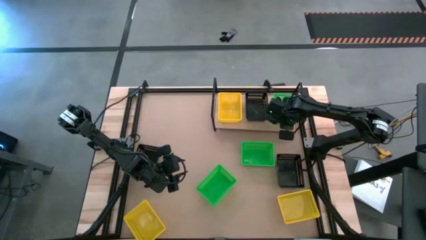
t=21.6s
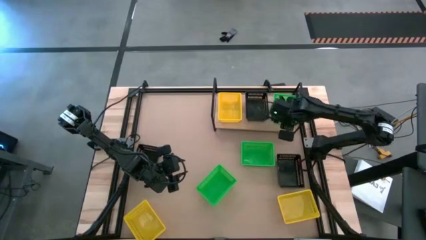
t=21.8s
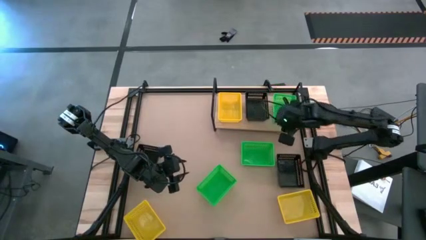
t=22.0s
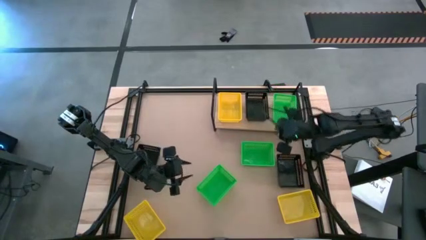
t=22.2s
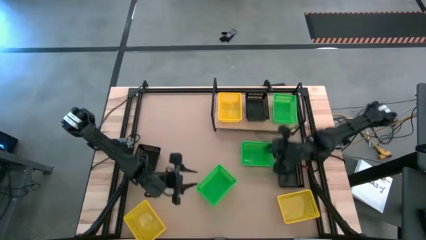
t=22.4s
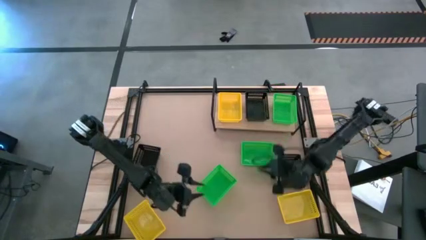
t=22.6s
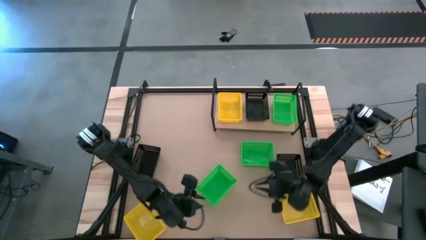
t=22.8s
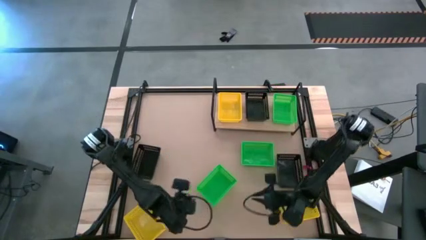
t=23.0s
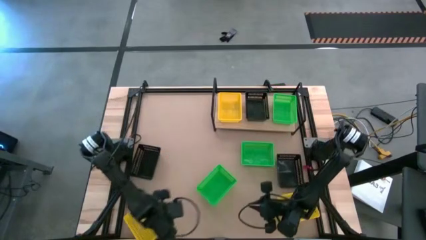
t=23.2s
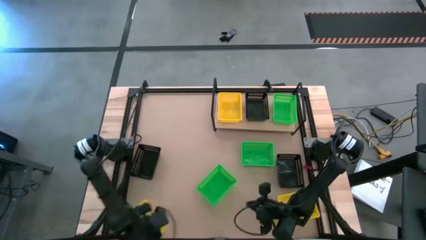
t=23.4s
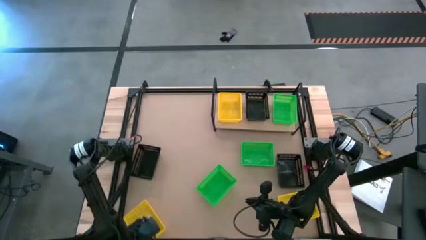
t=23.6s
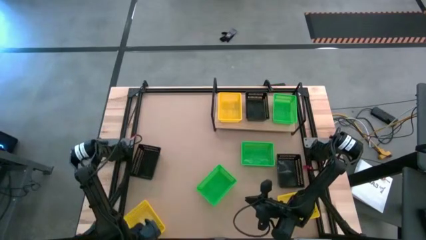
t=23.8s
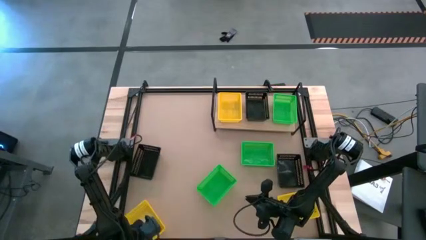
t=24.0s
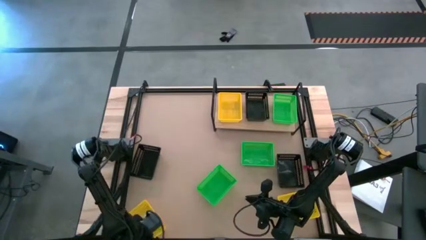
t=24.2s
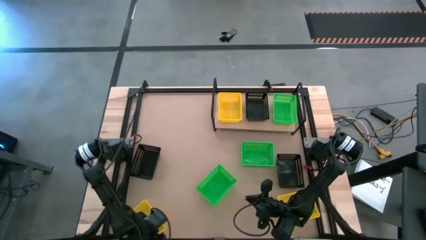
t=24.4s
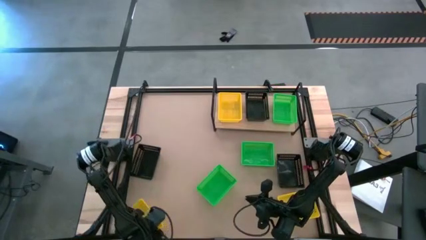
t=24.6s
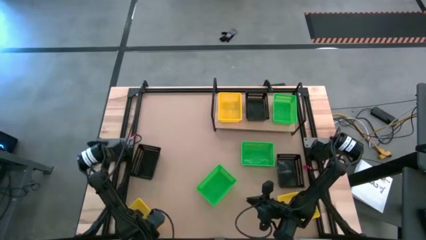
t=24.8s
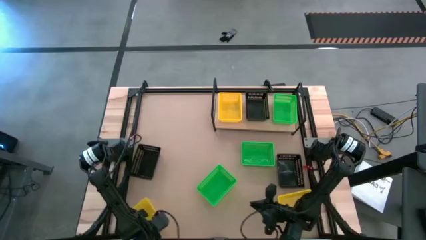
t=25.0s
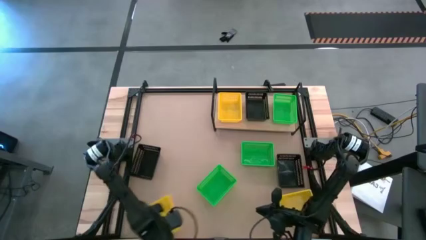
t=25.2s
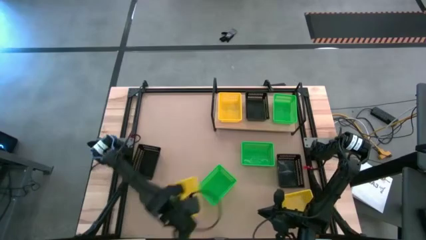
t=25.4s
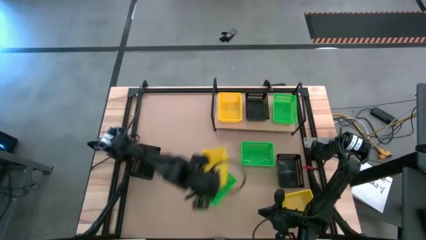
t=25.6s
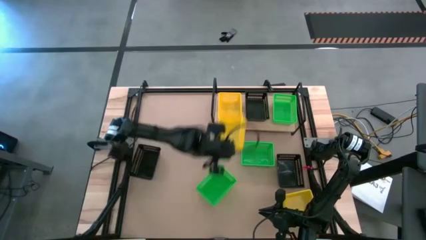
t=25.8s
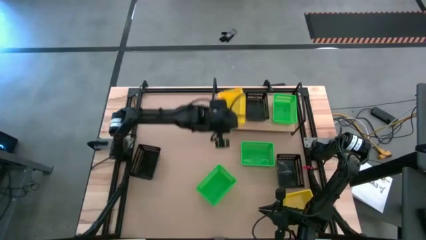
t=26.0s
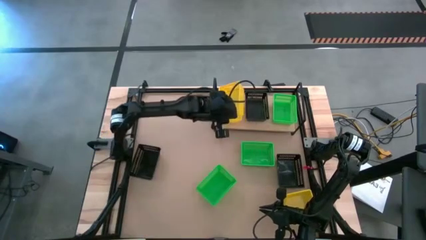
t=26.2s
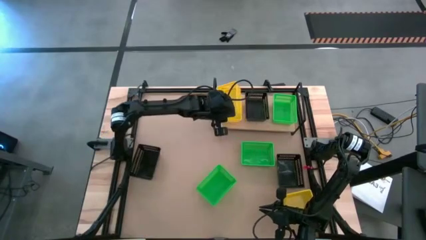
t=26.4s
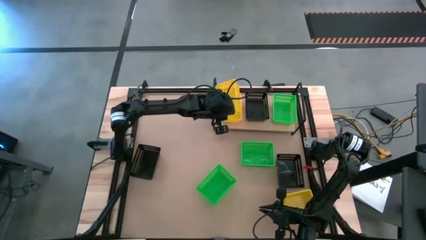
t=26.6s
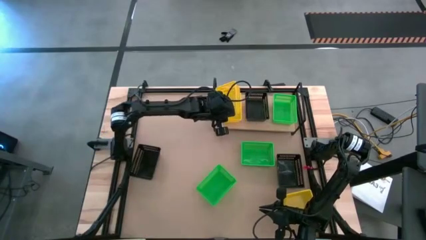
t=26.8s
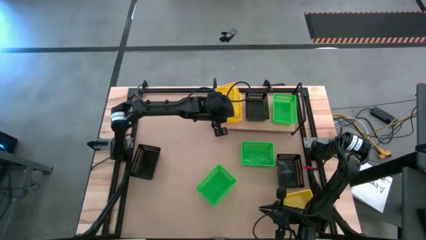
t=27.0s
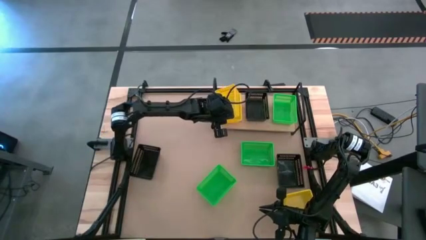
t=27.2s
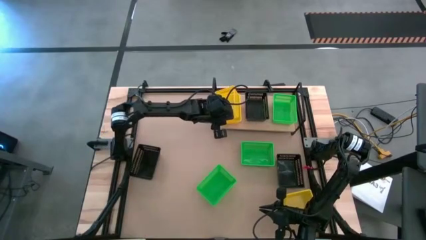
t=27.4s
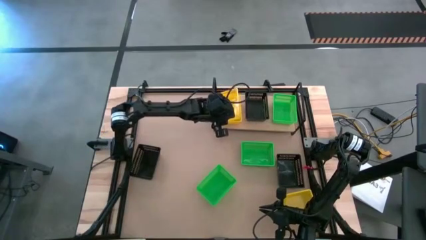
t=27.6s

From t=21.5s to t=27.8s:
Task: Stack baskets on shelf by color
Stack the left yellow bin on top of the yellow bin on the shelf

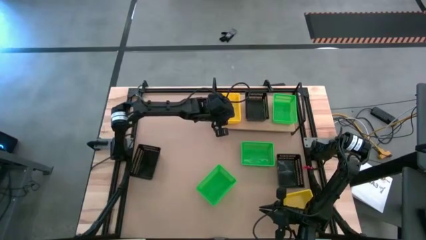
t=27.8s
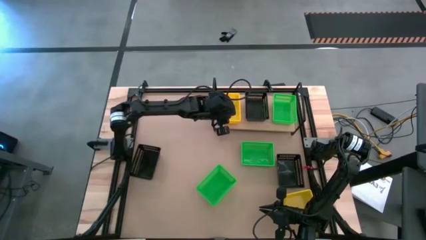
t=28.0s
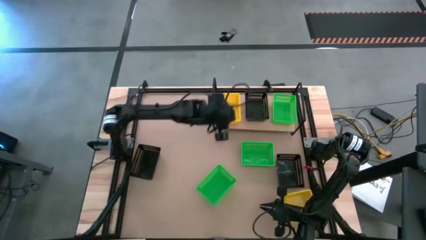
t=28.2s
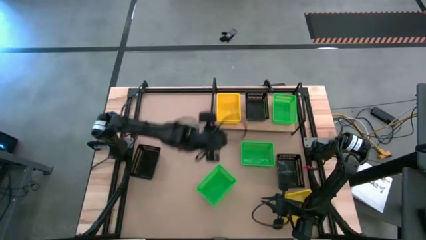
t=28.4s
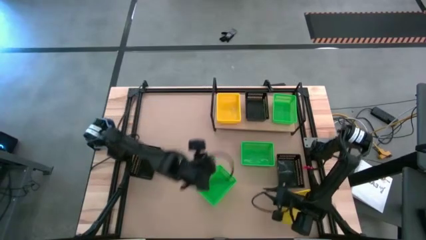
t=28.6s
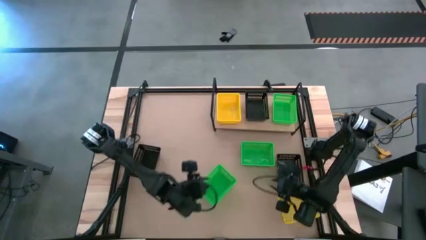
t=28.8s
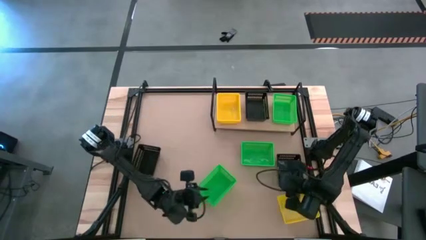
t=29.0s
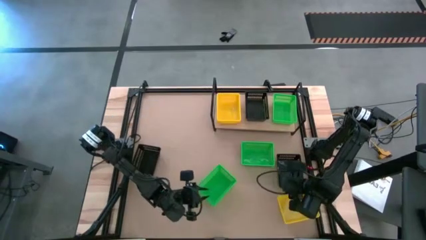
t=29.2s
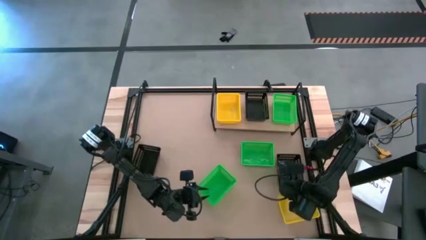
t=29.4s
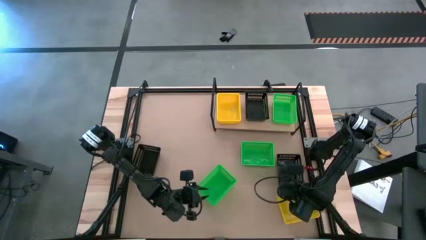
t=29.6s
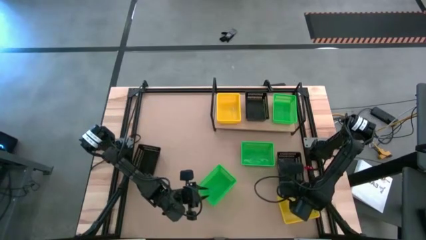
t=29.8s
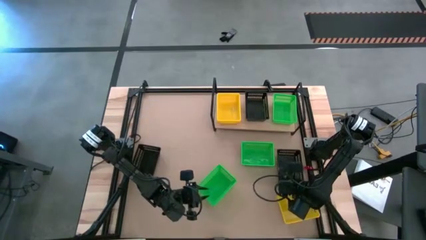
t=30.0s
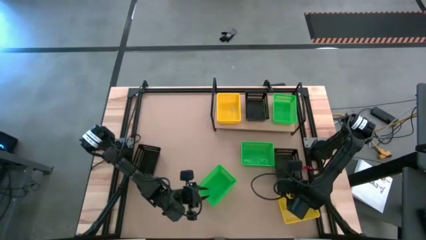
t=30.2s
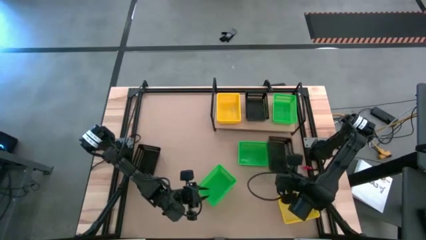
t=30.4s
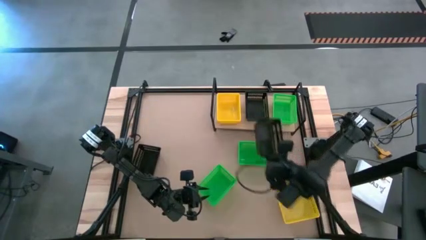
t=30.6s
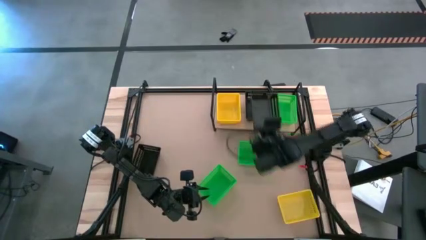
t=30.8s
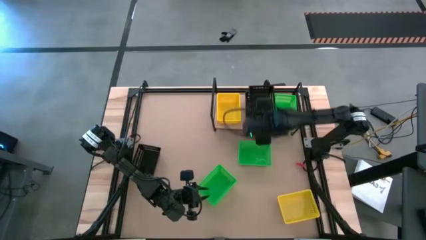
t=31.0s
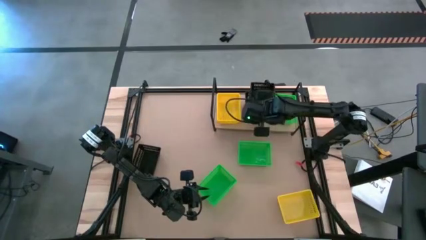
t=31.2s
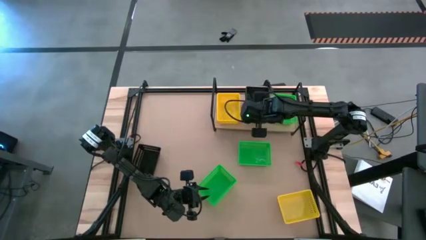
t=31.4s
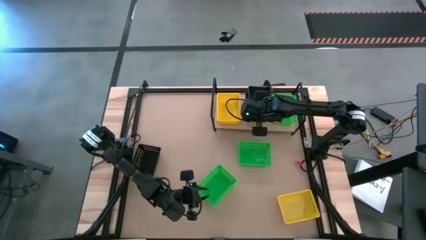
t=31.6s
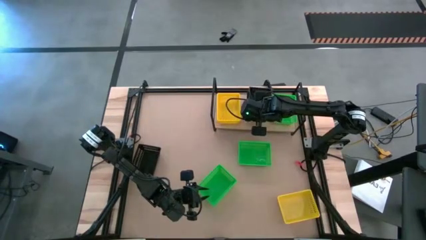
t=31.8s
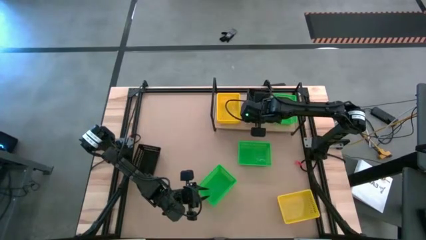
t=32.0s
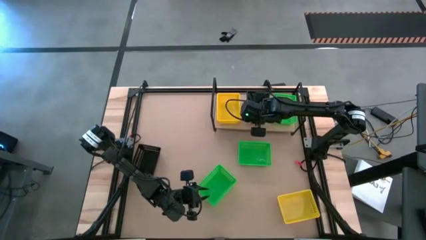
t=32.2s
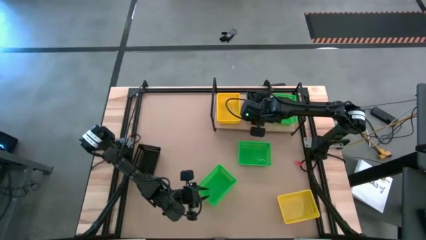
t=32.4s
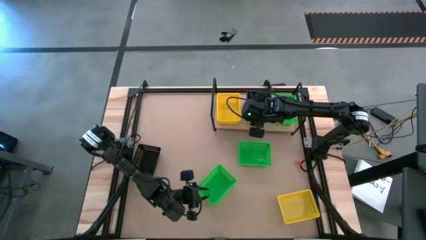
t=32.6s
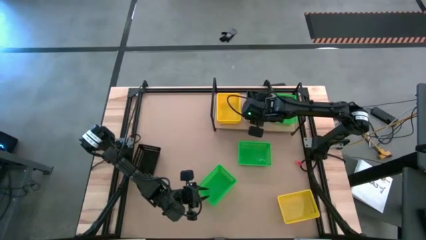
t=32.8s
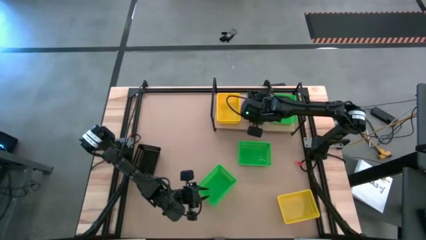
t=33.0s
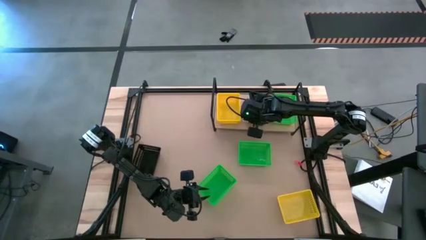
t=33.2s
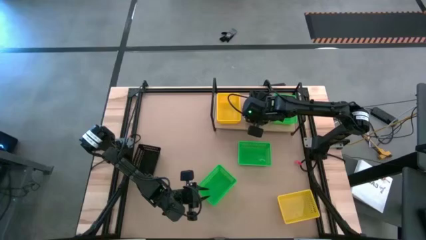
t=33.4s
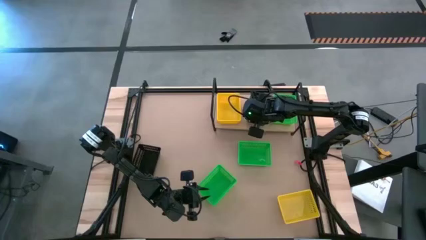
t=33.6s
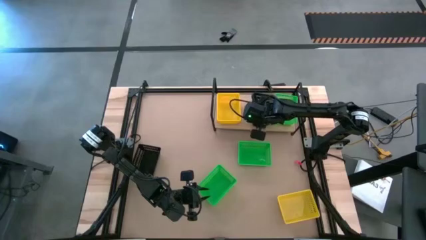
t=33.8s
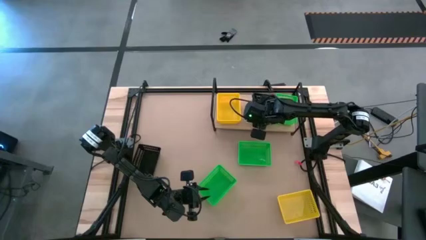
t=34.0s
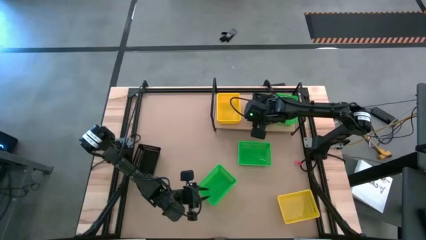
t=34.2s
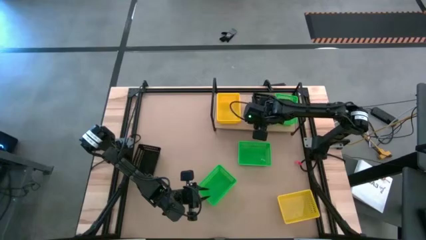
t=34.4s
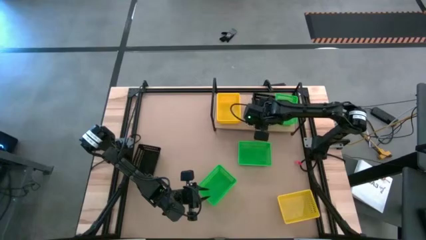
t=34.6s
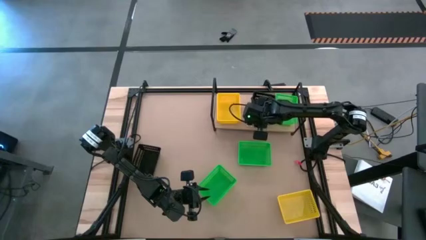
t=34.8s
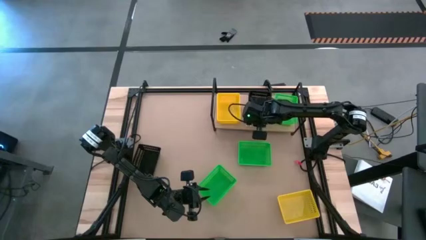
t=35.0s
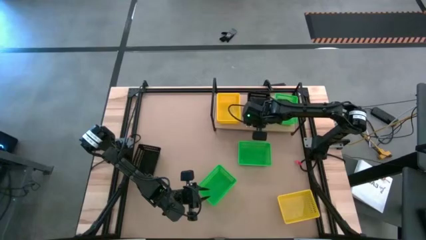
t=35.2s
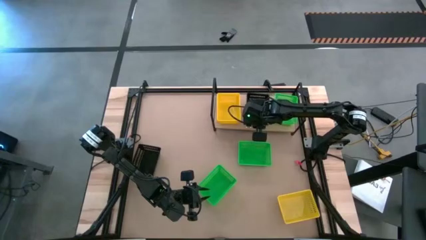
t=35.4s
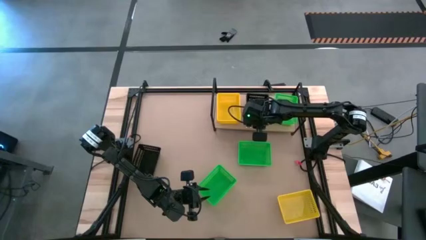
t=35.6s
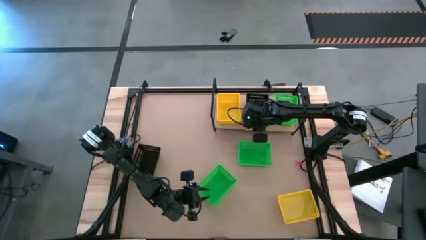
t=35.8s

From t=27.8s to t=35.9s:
Stack the right black bin on top of the black bin on the shelf

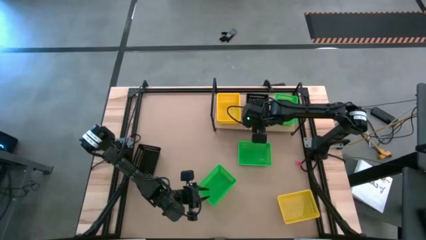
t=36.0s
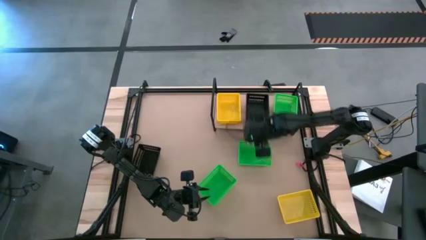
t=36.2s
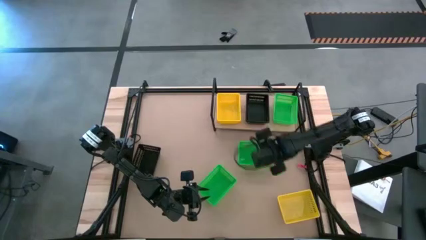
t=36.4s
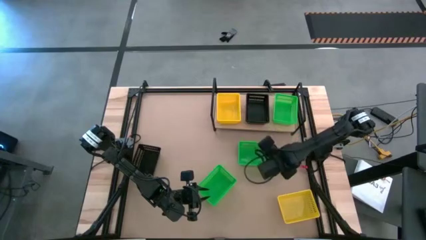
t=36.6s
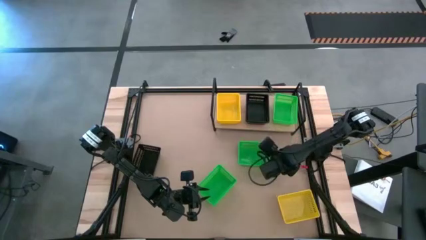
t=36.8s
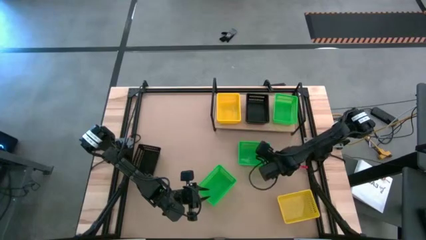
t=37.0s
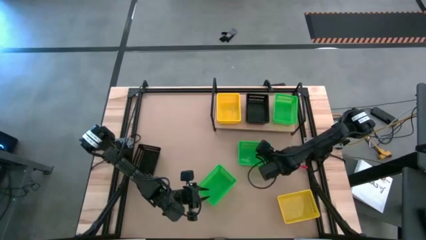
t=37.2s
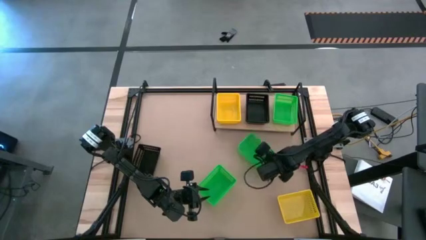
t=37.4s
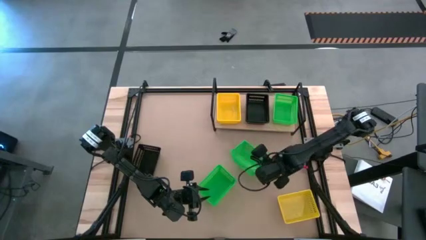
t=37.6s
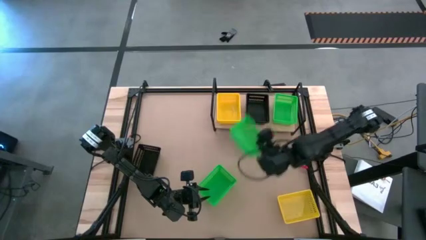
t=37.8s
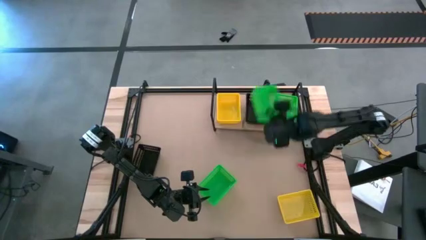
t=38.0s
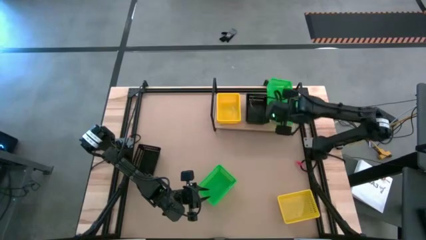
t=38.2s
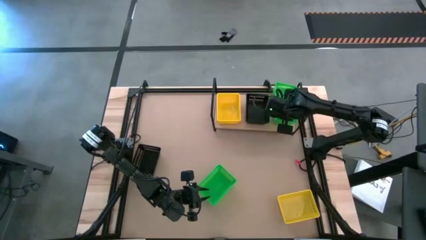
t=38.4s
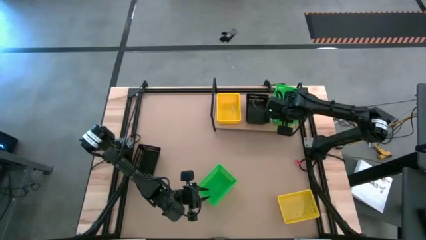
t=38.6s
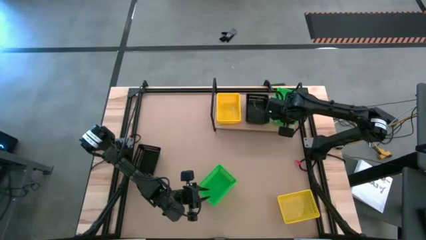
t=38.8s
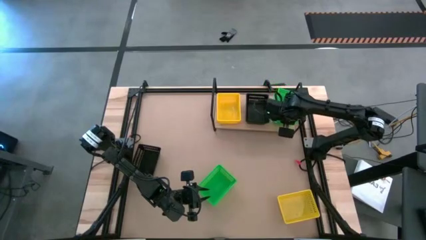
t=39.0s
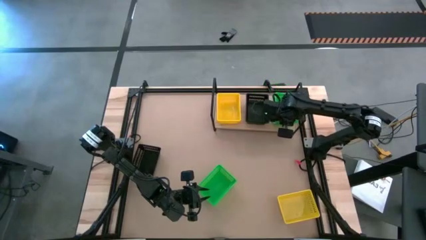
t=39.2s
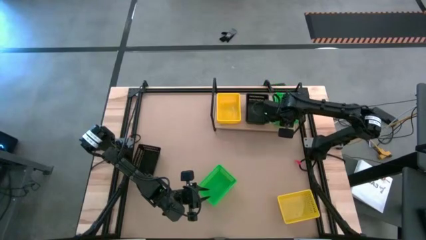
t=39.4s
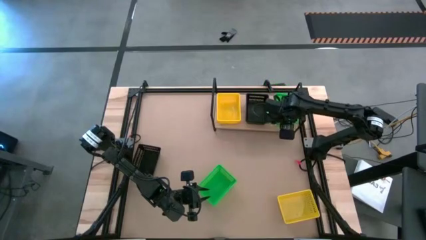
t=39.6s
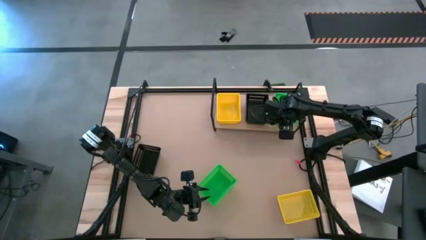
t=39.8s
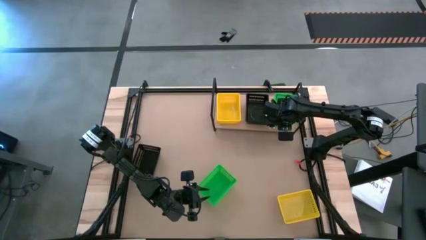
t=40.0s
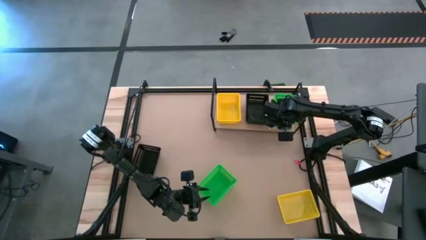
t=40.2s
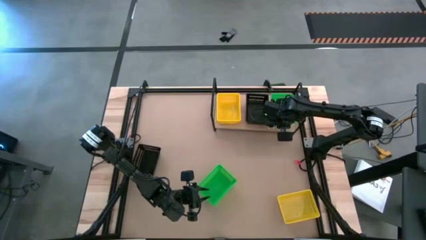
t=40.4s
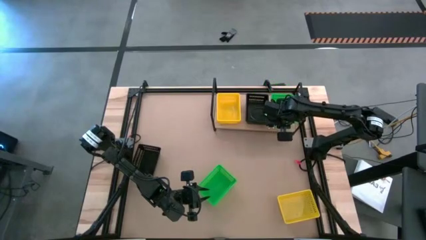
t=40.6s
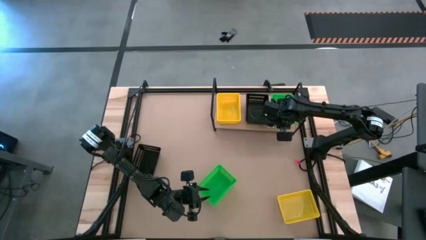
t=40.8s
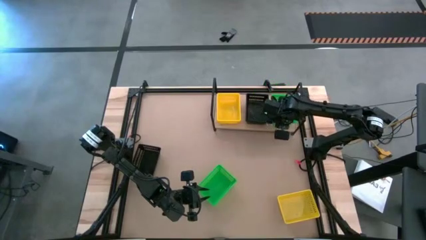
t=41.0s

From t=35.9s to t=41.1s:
Stack the top green bin on top of the green bin on the shelf
